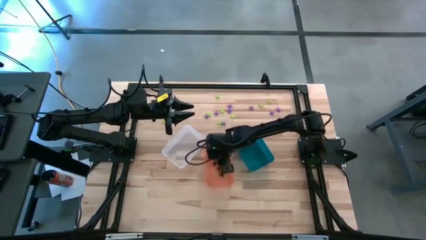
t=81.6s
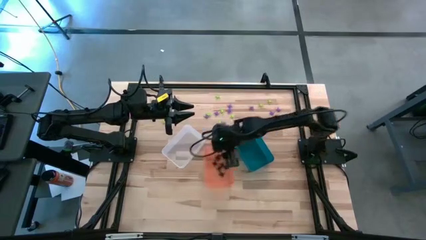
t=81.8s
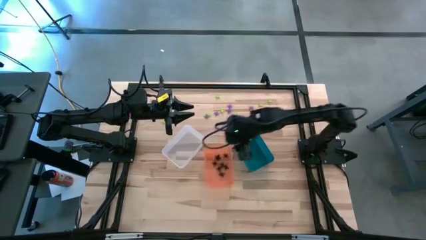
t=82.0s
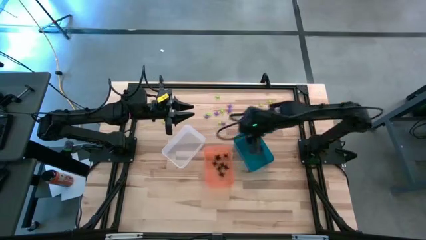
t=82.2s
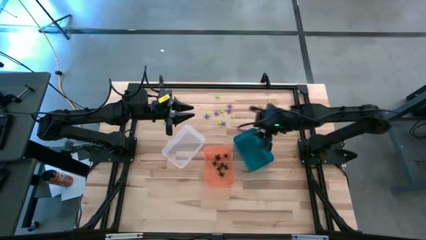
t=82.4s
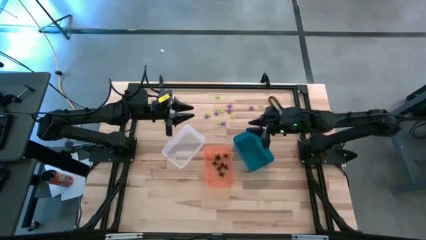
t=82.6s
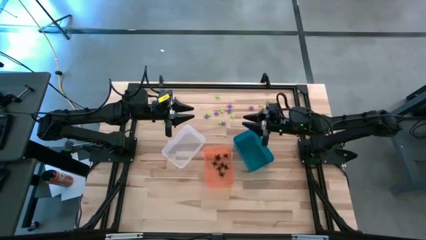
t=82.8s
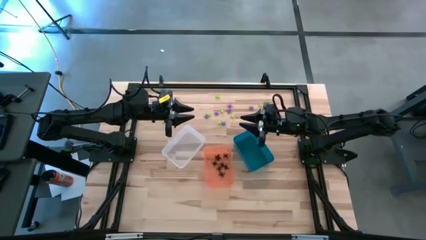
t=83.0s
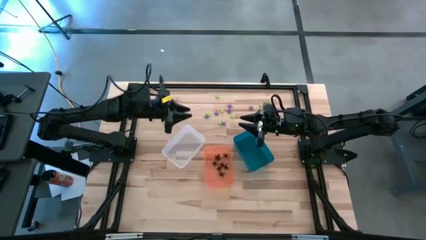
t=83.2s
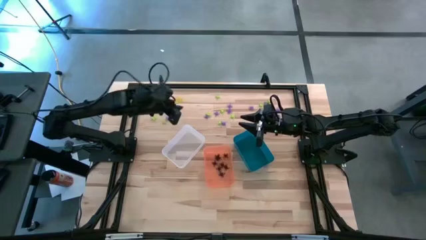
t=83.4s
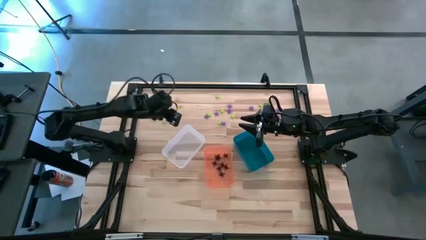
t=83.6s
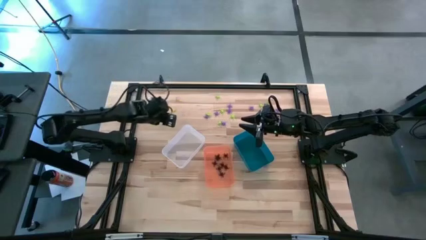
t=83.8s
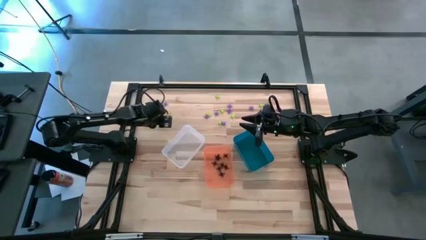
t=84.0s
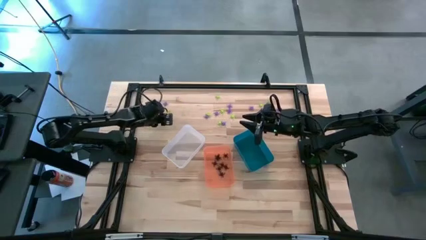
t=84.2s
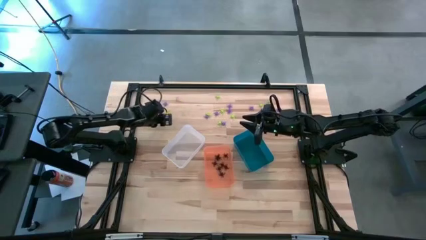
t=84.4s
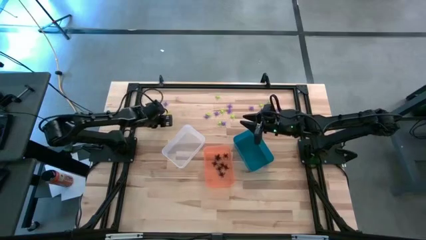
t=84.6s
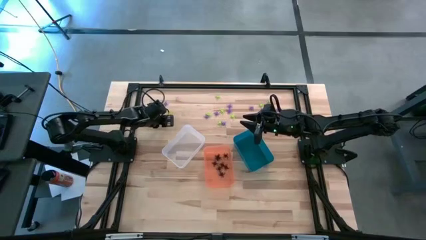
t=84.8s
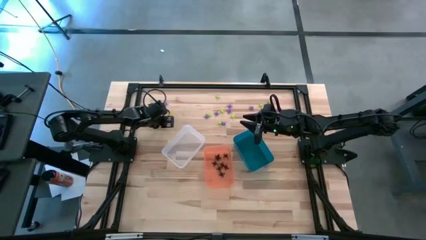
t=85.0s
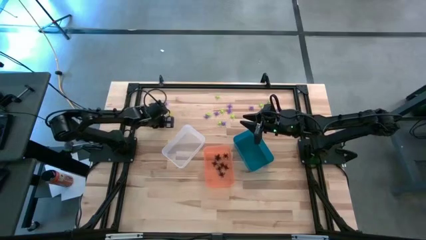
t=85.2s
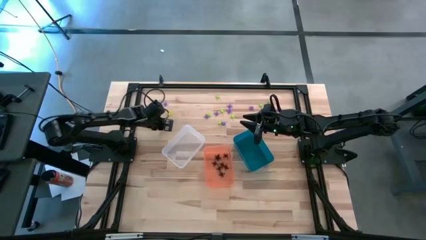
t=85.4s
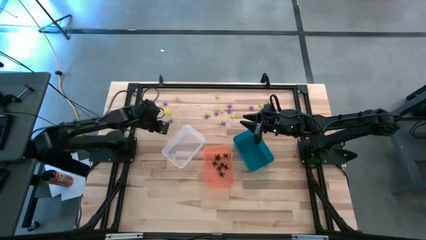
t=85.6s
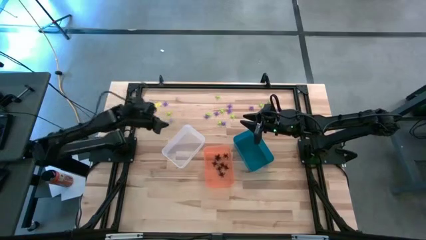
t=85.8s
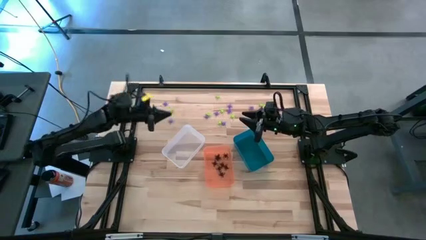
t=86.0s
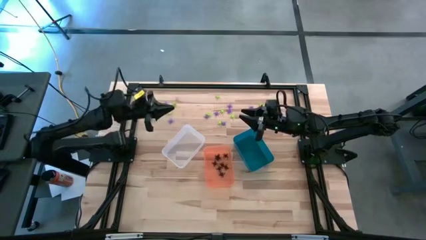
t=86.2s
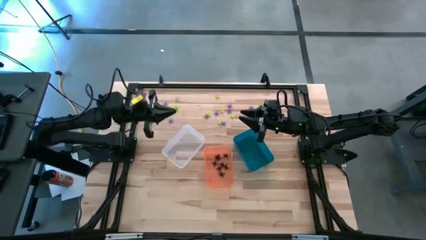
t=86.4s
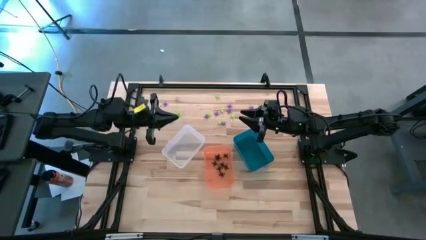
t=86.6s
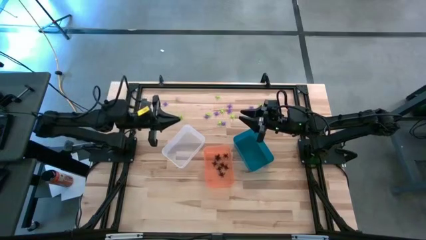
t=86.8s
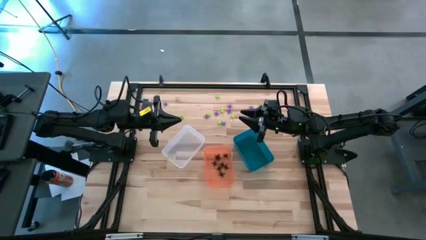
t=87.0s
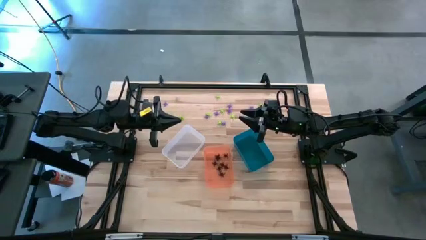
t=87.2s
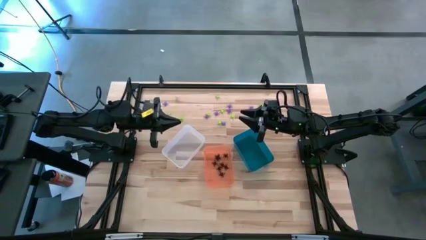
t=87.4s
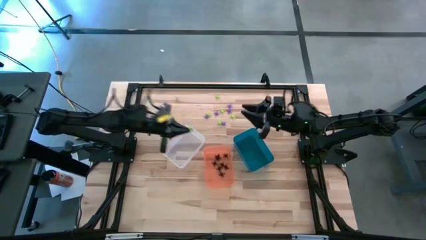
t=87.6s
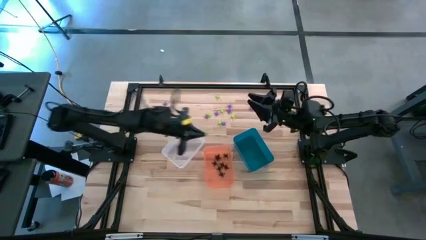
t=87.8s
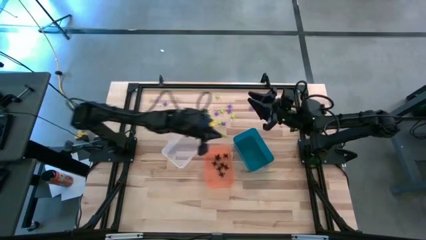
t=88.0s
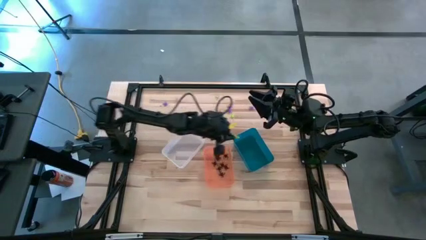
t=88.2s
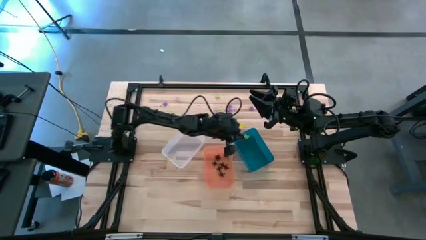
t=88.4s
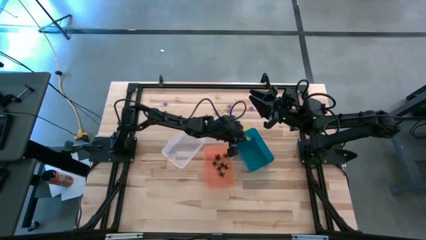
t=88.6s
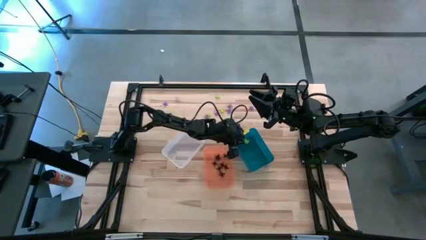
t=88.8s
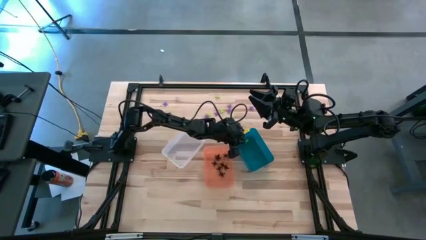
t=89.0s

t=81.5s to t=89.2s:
Task: Sort Halloween decoration
Put the green spider toy into the blue bin

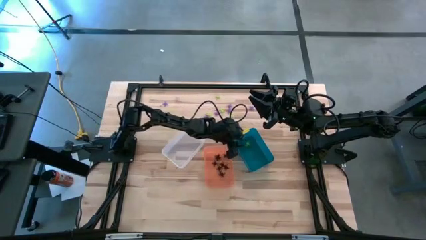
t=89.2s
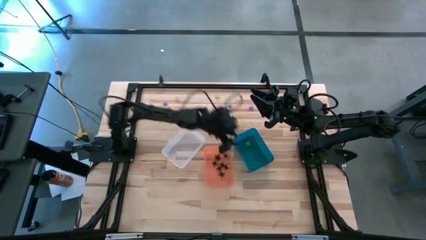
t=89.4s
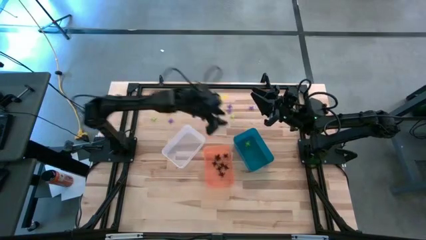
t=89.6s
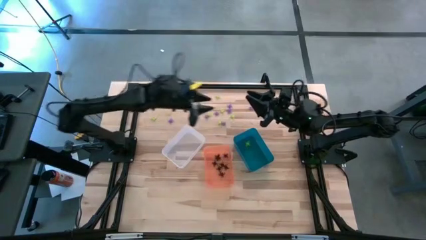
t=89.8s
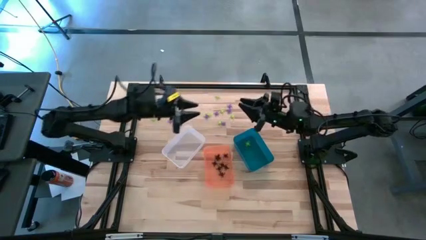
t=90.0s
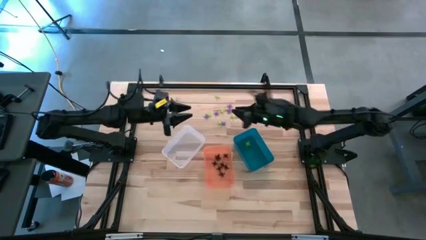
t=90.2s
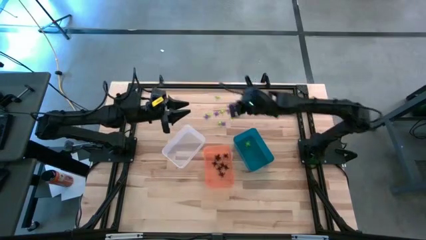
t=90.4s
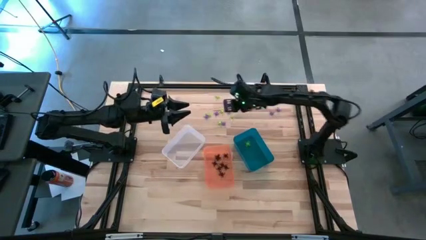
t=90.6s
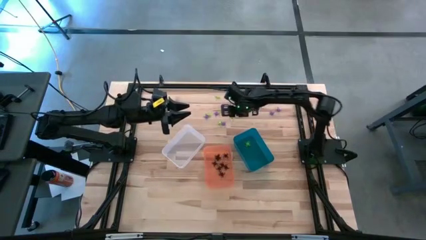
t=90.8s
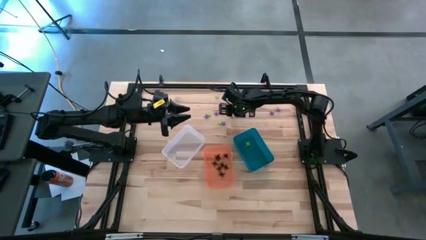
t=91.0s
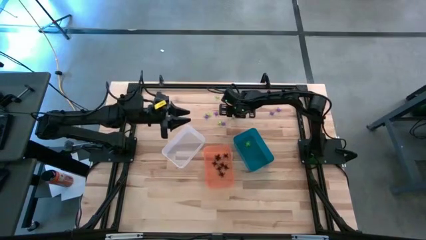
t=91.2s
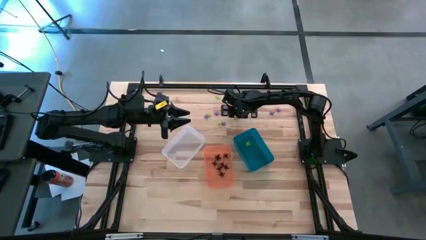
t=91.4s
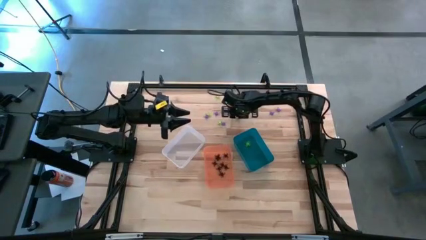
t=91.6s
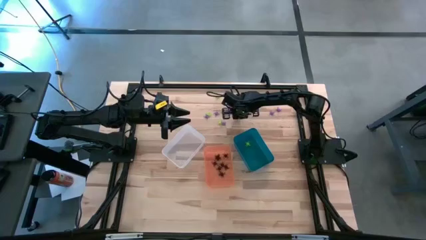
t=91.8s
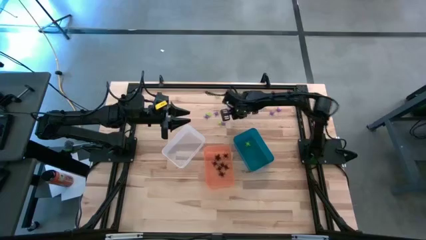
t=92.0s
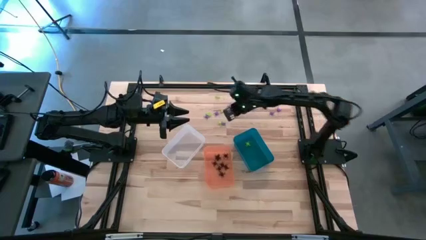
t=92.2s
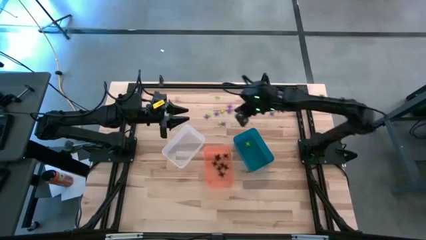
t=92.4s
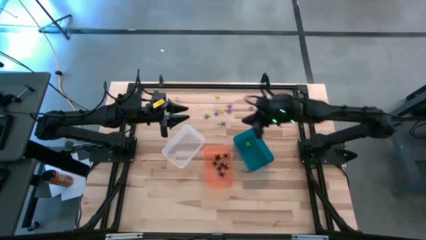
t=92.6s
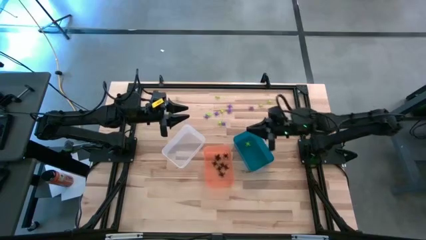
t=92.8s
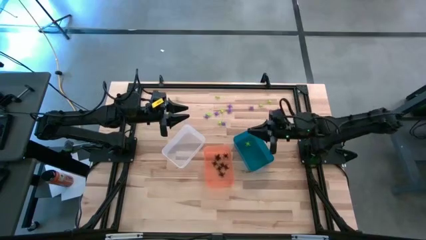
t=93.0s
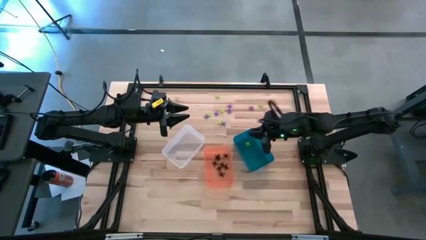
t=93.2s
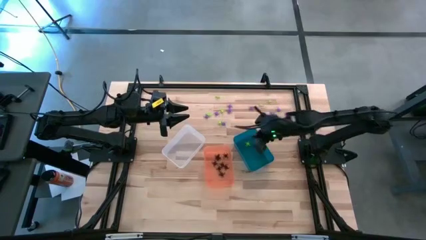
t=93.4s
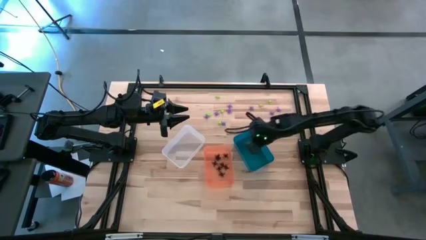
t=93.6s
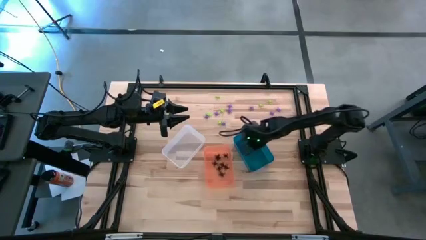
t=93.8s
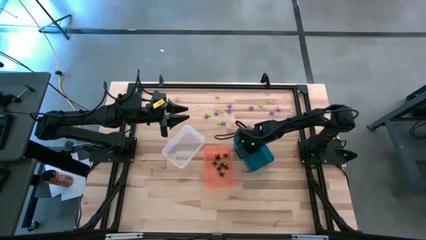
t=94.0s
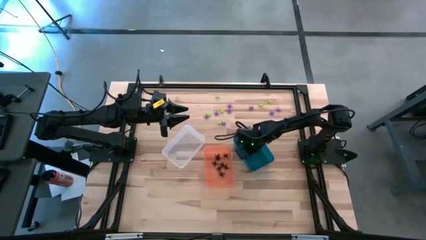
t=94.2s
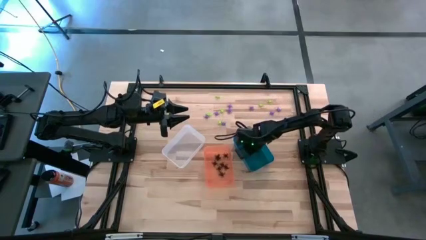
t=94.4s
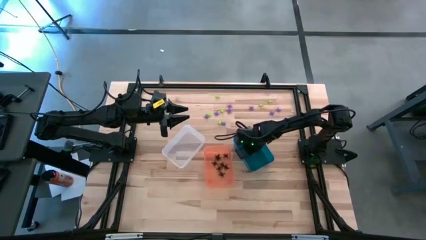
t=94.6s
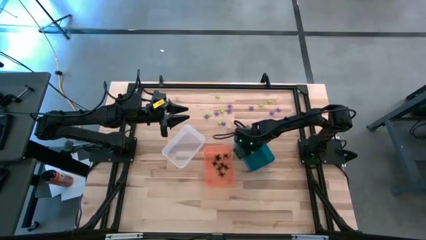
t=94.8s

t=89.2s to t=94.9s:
Put the green spider toy into the blue bin
